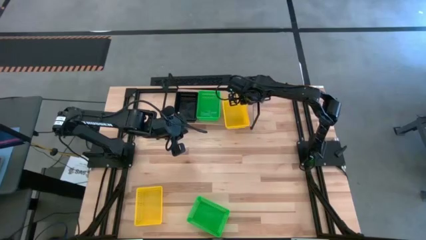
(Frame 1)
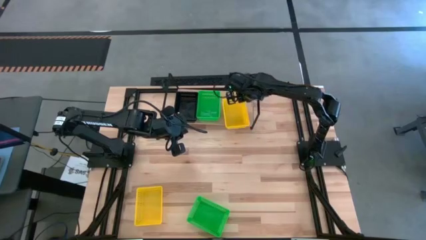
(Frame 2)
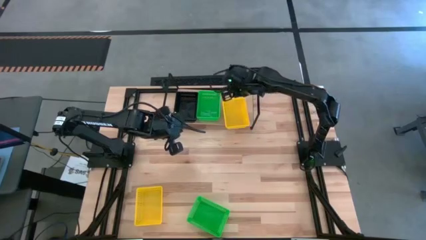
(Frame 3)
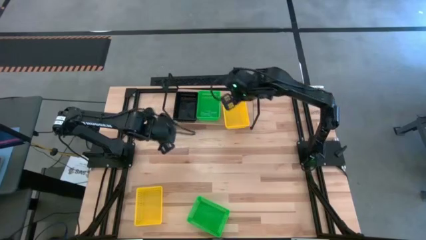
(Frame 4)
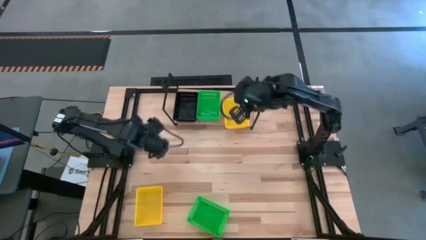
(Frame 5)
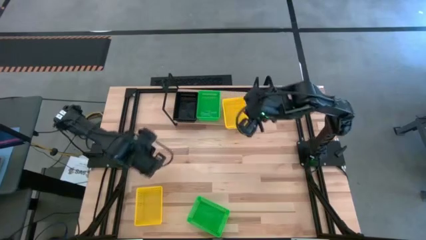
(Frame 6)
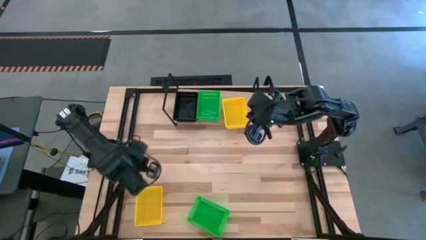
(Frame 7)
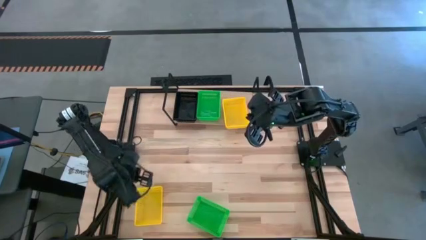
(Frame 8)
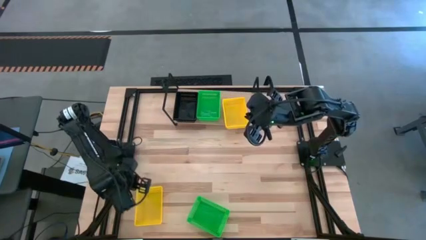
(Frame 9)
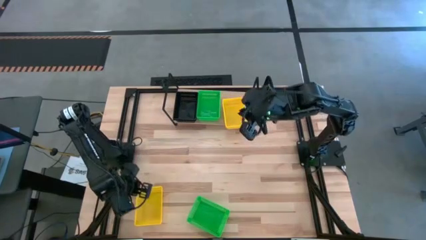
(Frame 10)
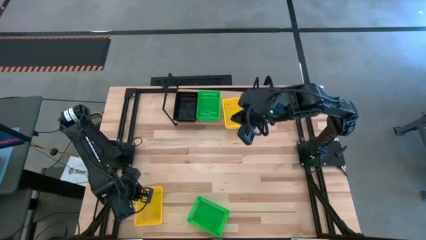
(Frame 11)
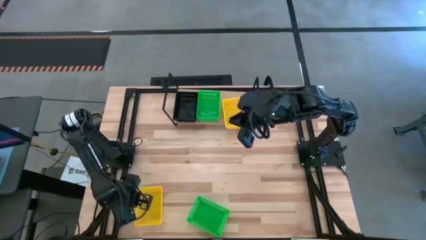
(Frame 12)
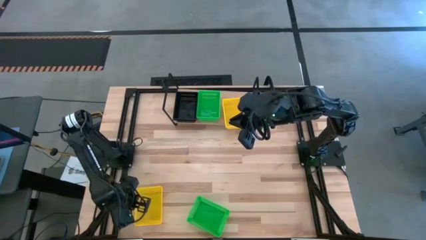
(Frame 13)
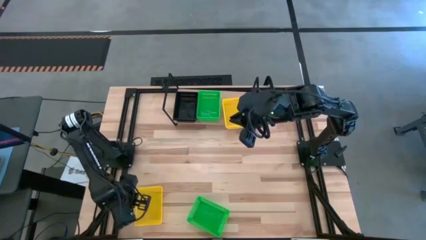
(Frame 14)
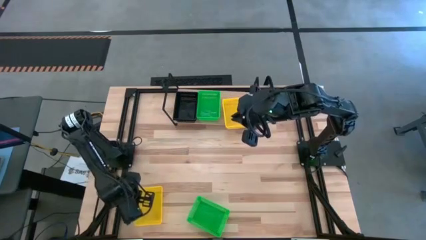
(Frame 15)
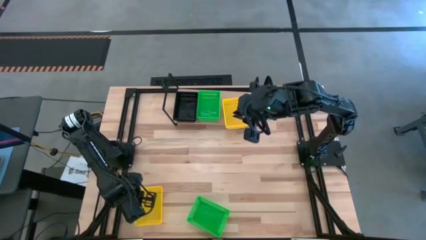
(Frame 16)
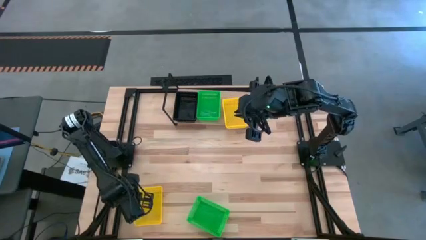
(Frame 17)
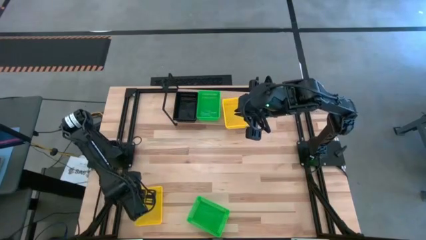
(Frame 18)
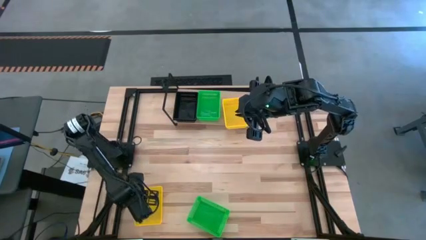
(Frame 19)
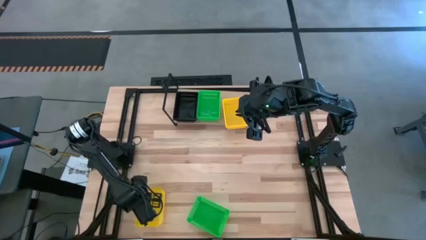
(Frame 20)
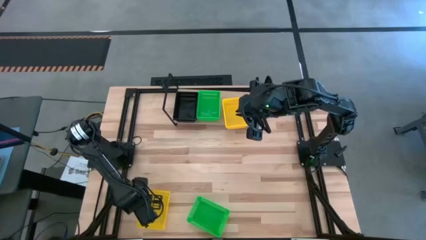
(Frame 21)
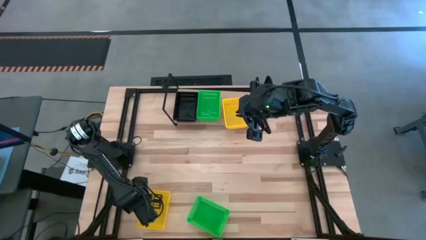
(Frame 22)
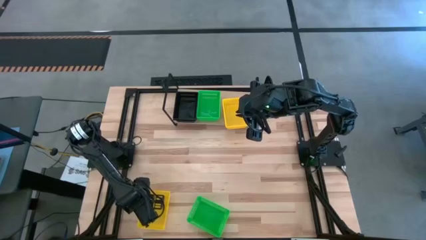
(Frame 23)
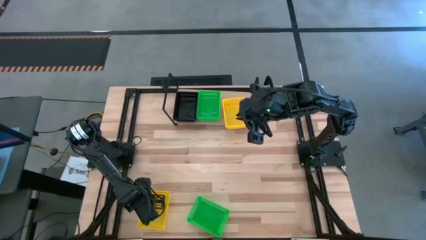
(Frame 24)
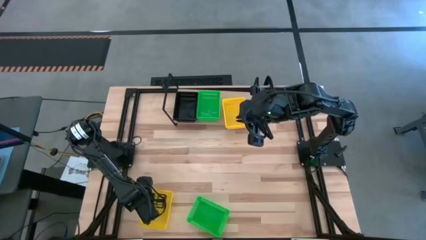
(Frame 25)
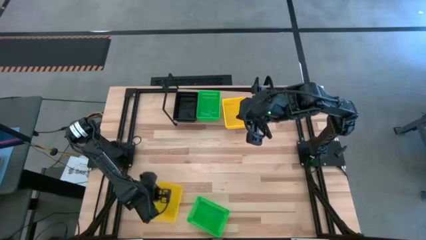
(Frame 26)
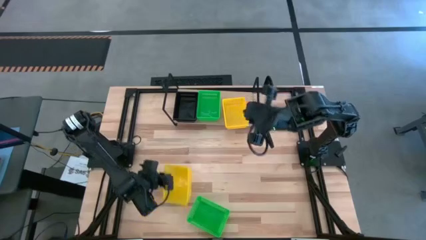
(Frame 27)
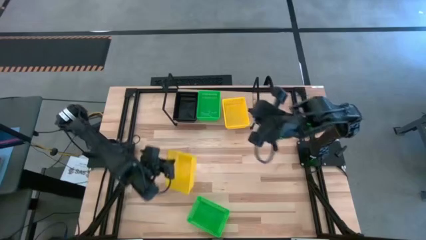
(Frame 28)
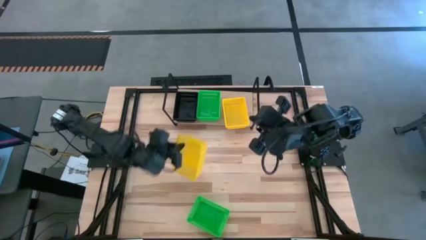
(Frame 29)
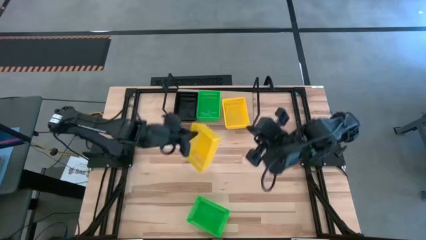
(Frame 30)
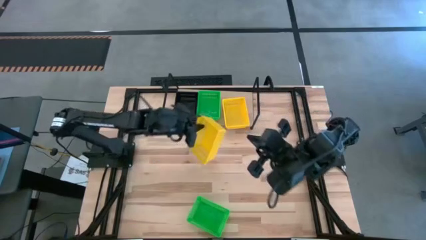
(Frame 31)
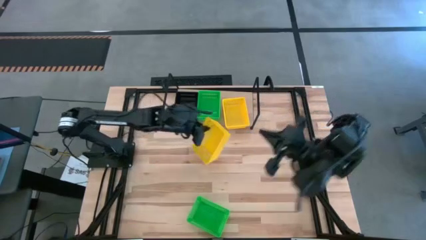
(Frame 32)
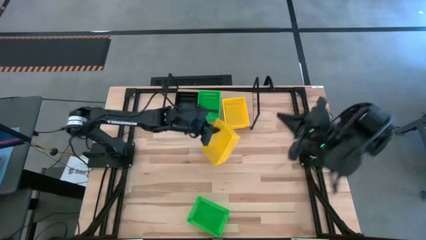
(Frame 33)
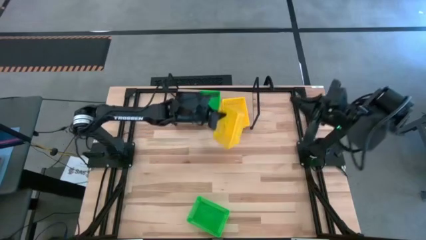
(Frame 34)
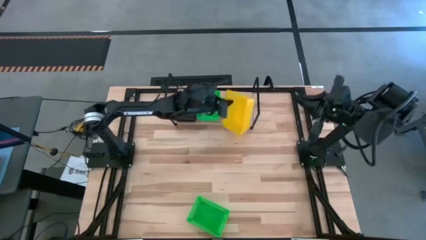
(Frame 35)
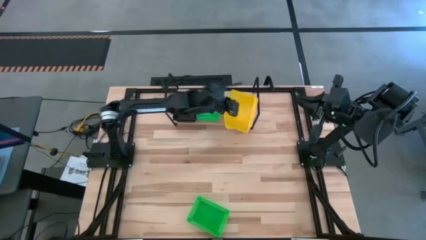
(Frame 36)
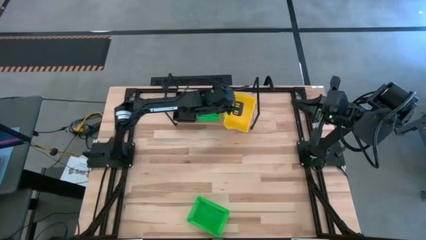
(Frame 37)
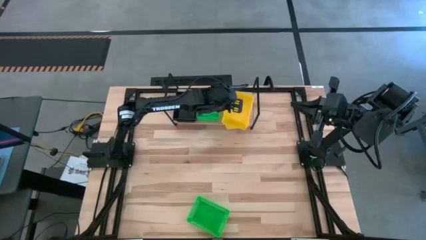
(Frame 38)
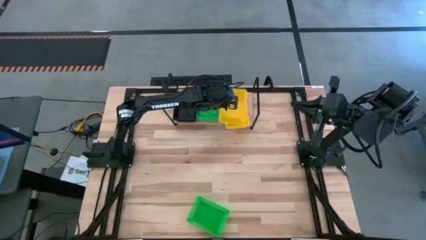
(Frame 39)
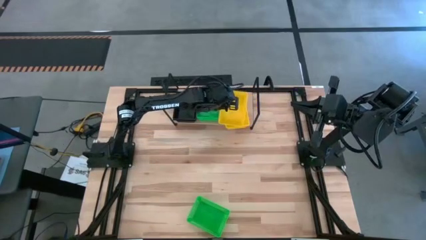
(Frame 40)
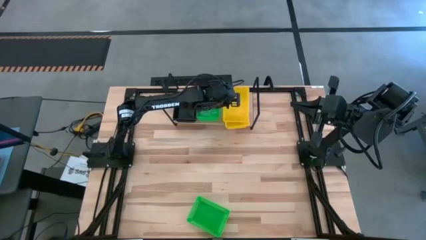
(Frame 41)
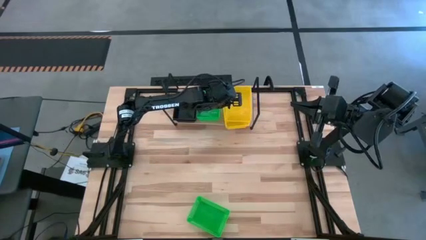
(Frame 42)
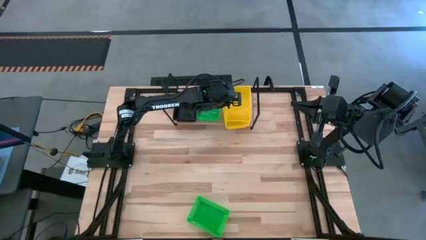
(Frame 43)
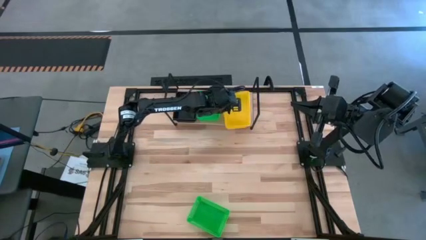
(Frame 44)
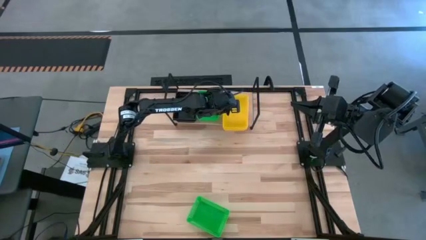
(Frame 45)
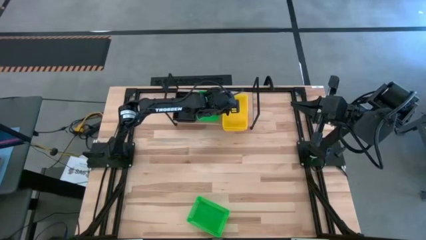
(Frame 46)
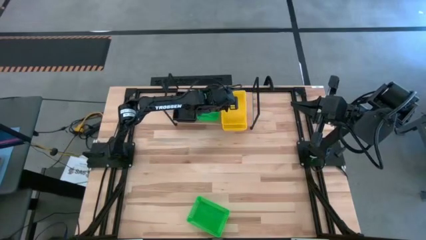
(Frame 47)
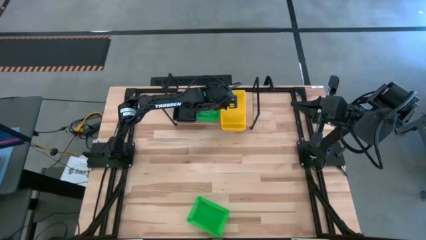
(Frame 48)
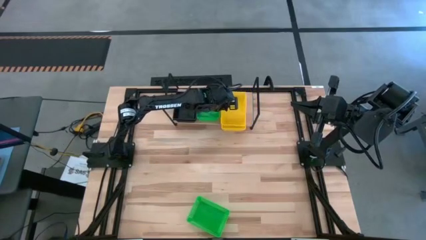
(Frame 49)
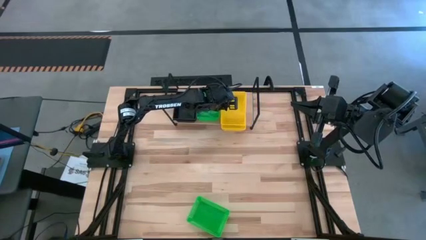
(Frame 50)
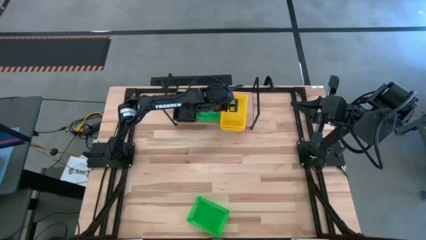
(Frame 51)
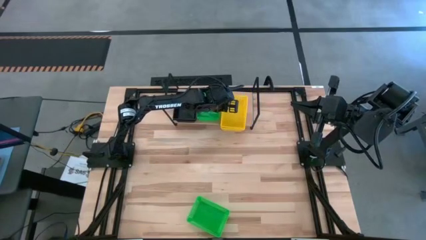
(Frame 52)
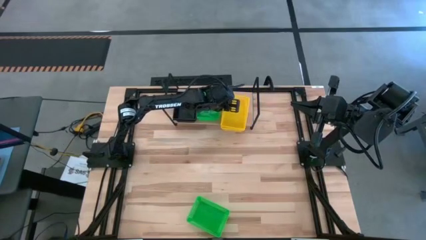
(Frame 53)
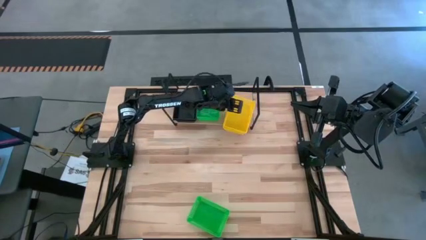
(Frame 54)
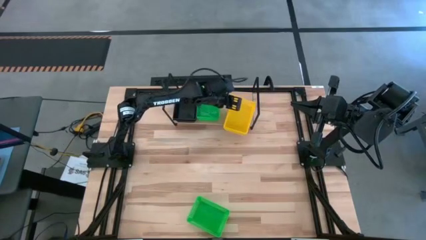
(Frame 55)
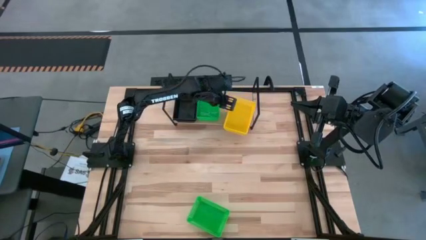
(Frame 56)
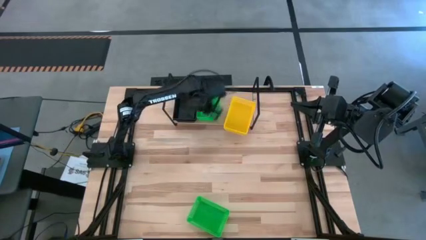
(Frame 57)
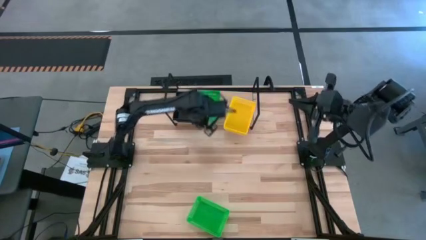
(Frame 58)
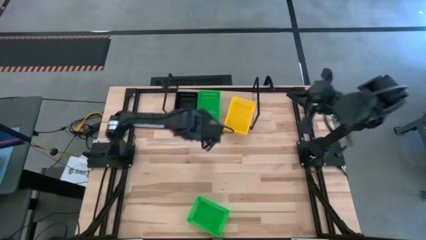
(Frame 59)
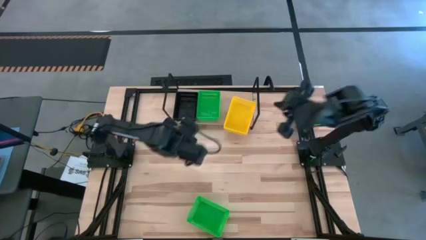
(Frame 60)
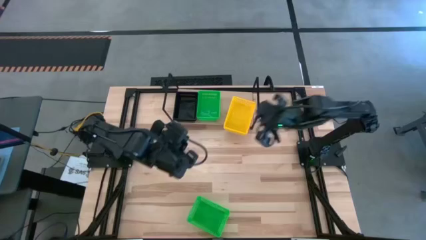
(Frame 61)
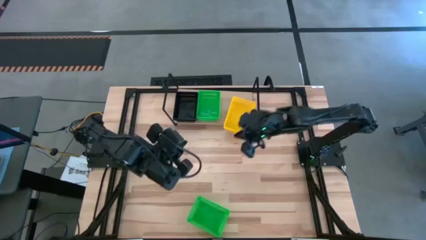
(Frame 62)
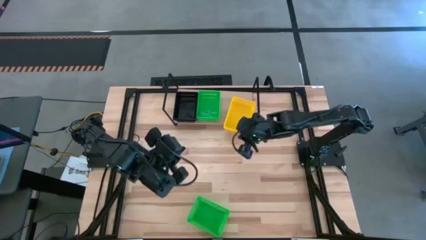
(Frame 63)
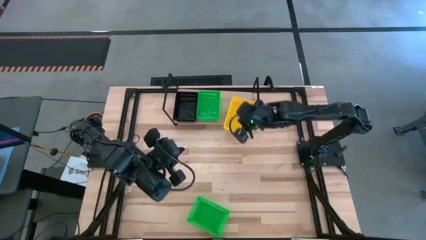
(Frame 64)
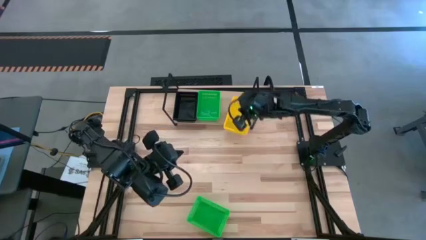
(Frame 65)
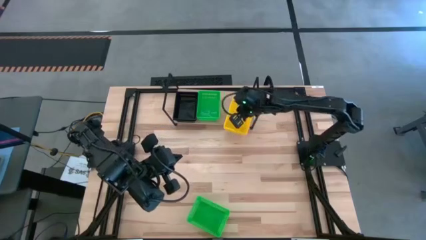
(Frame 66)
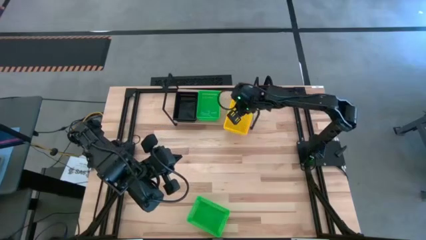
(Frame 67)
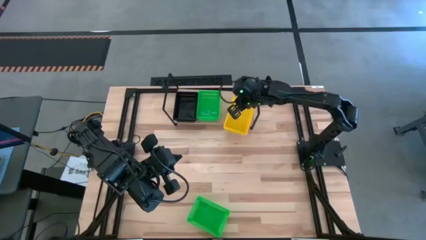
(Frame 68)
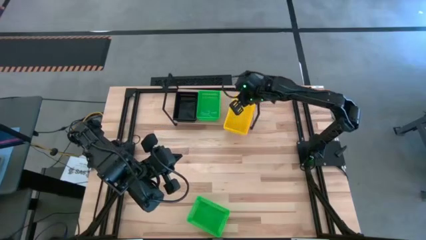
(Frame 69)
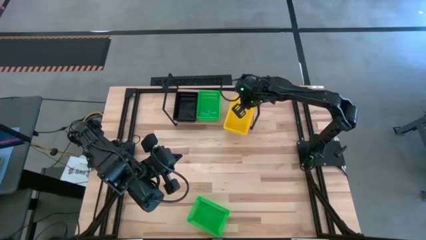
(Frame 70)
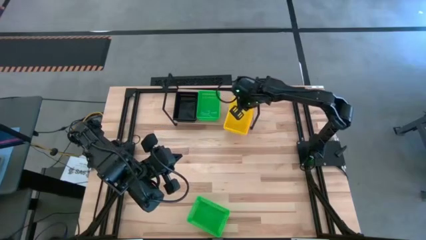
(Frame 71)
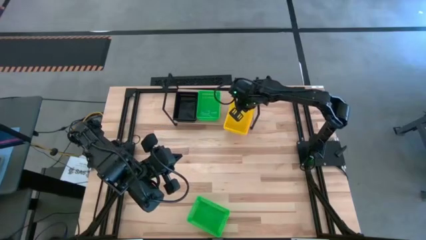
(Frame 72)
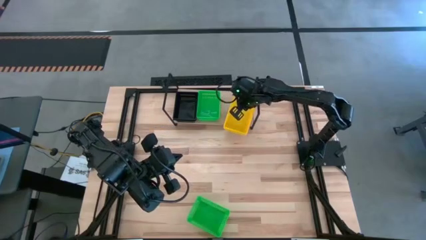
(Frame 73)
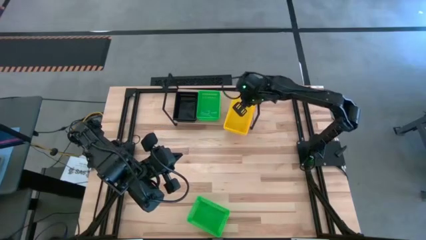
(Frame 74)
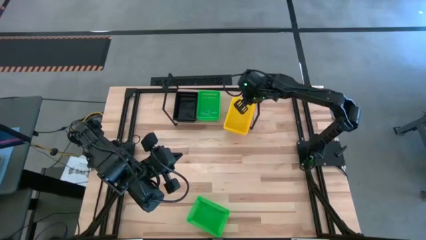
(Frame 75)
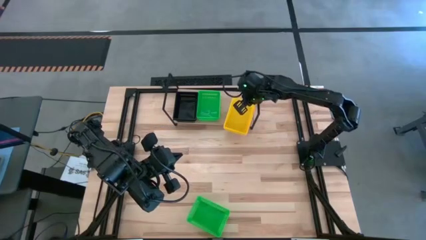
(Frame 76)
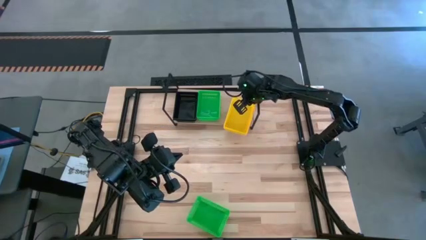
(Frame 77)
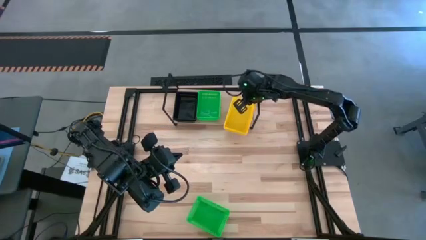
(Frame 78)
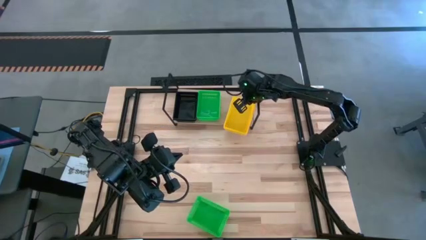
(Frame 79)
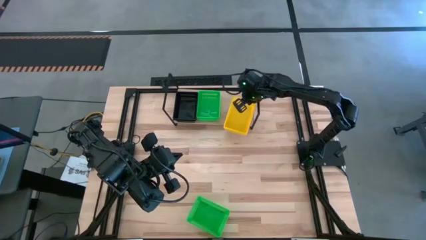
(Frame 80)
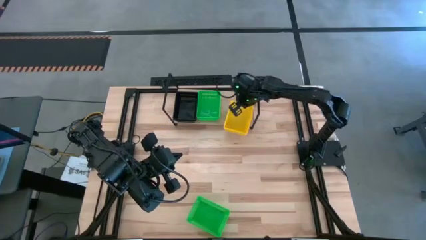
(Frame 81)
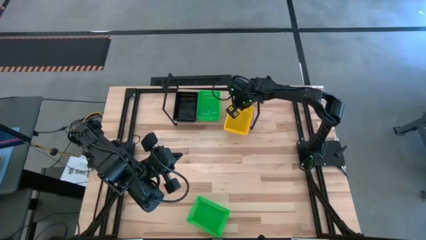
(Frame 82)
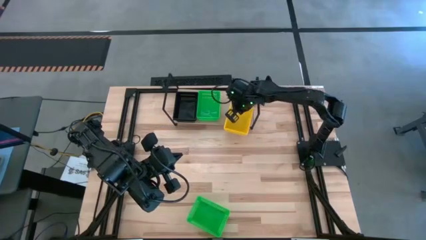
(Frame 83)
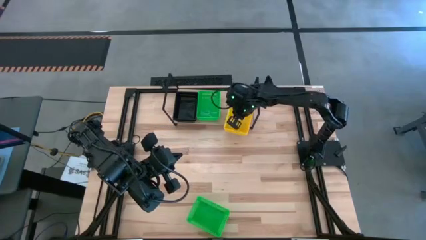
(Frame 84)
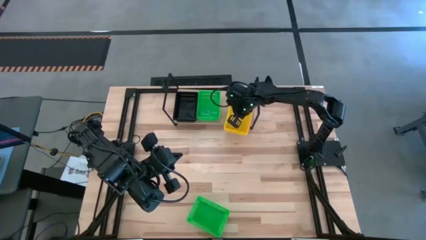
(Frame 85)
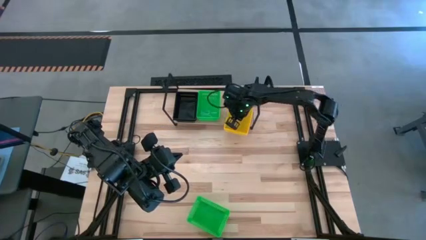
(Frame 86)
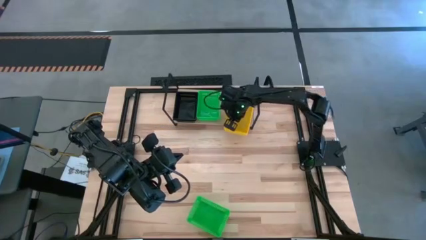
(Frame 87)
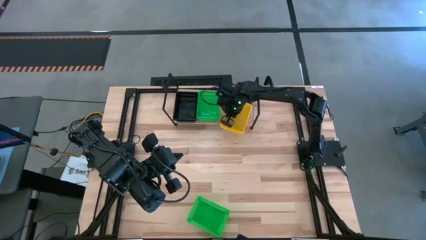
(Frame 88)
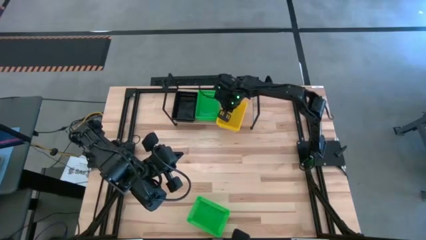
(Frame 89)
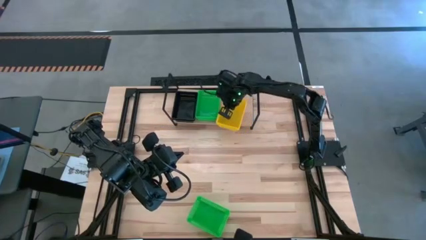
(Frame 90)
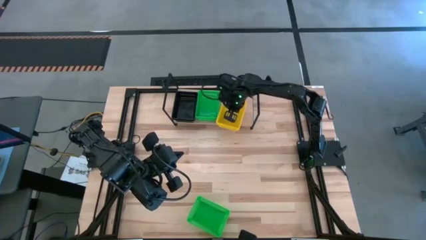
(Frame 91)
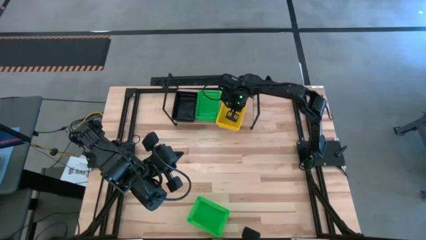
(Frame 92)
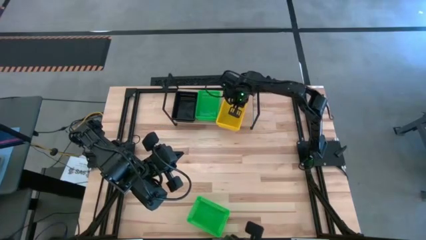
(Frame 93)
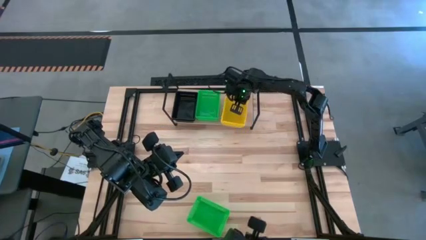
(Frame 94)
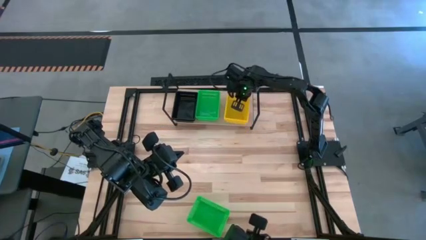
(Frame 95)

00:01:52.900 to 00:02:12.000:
Task: Stack baskets on shelf by color
Stack the yellow bin on top of the yellow bin
